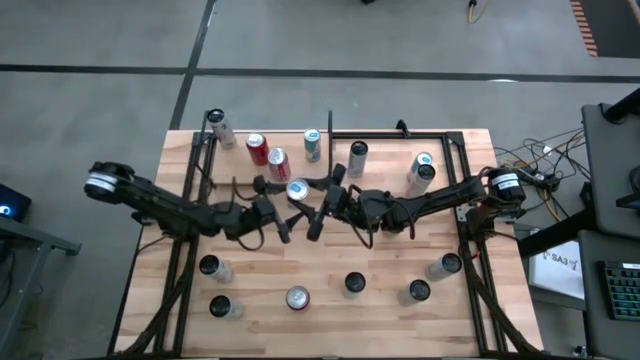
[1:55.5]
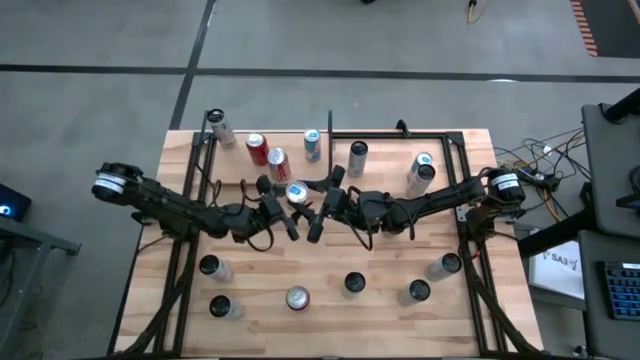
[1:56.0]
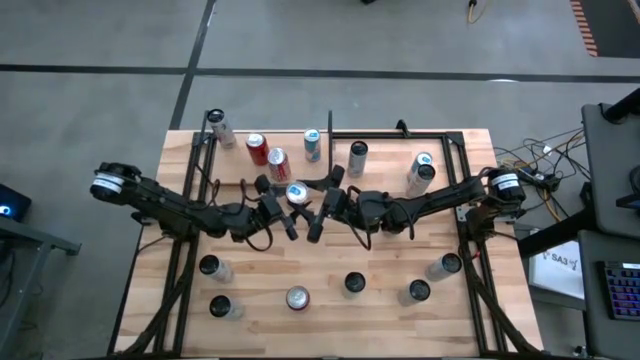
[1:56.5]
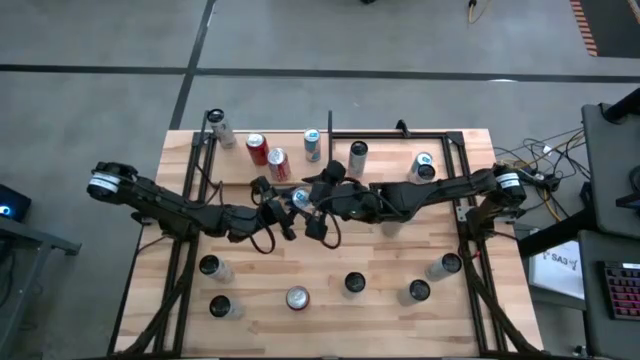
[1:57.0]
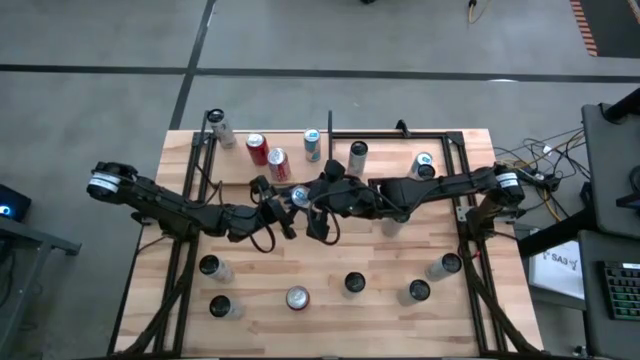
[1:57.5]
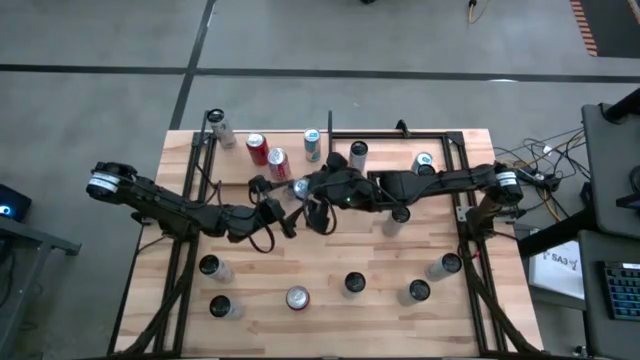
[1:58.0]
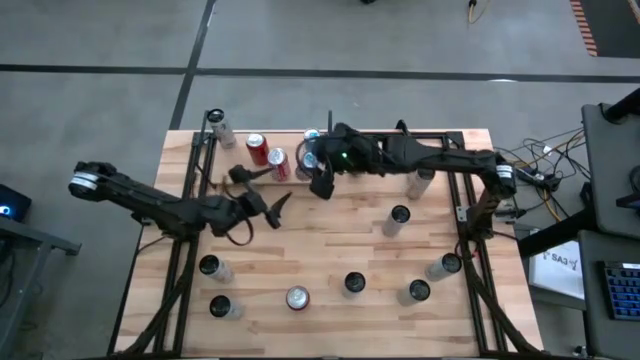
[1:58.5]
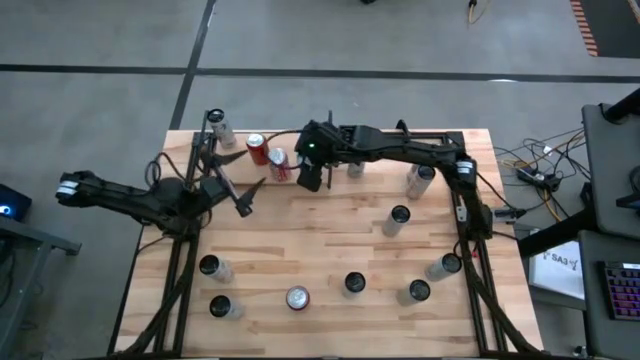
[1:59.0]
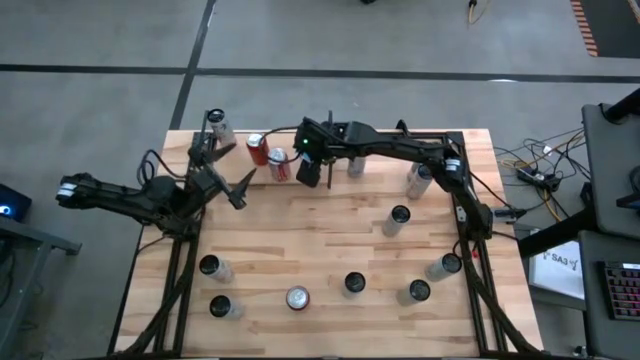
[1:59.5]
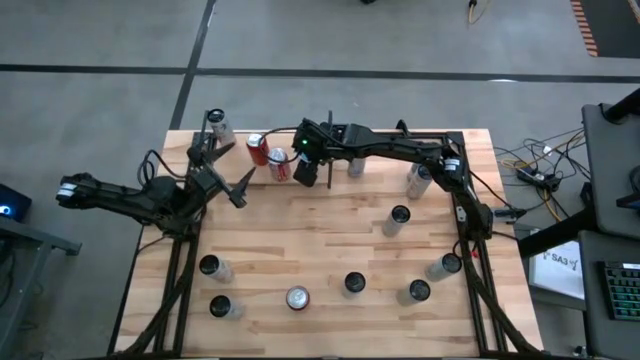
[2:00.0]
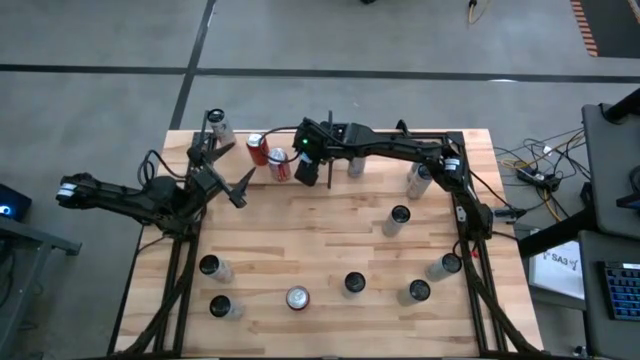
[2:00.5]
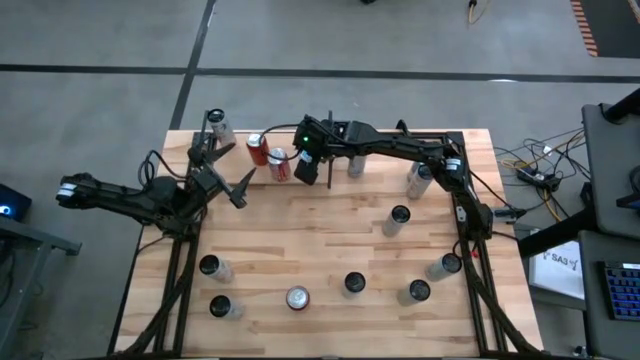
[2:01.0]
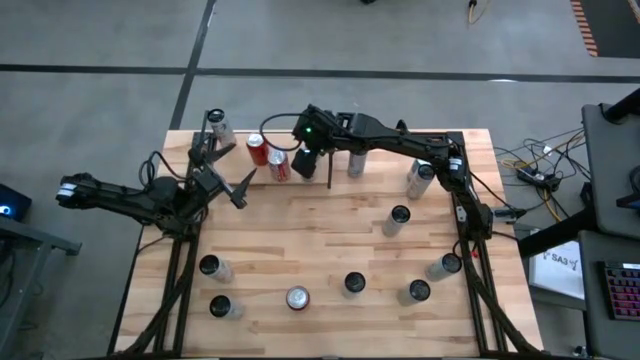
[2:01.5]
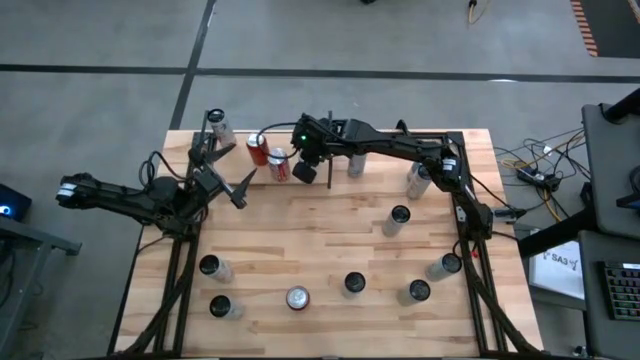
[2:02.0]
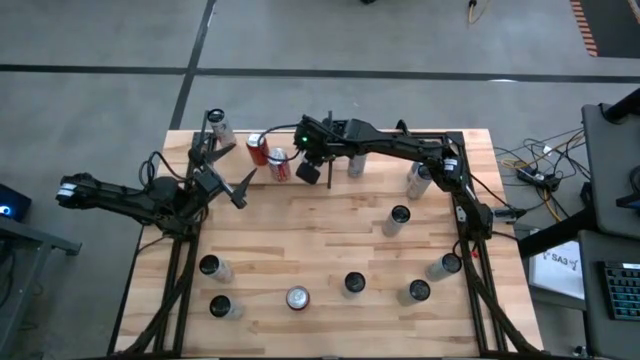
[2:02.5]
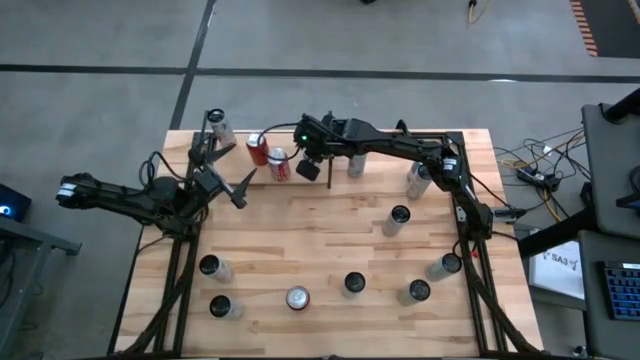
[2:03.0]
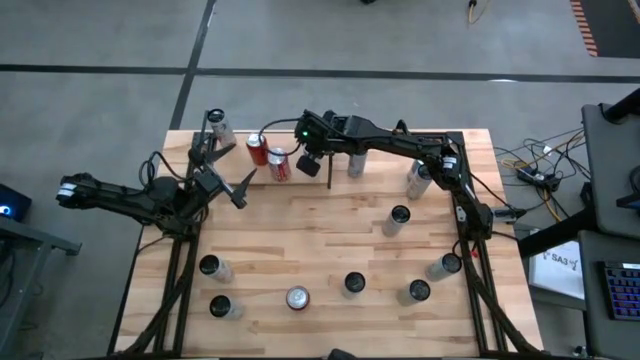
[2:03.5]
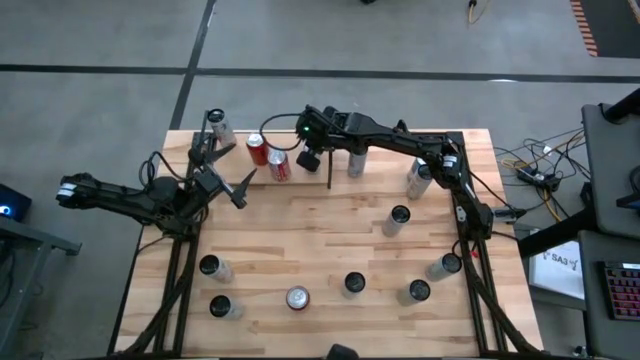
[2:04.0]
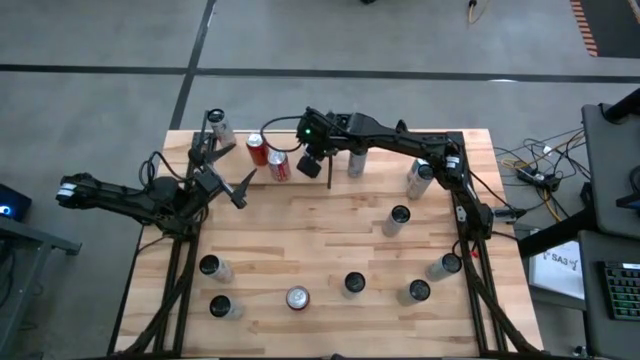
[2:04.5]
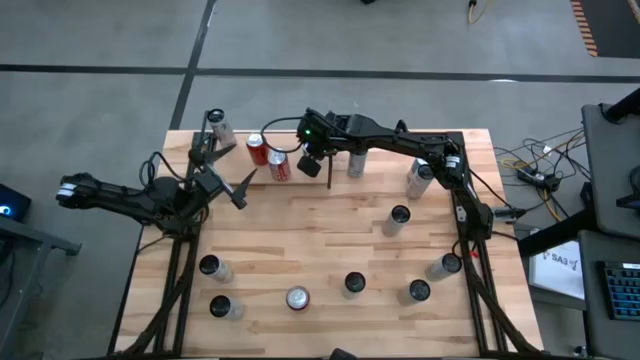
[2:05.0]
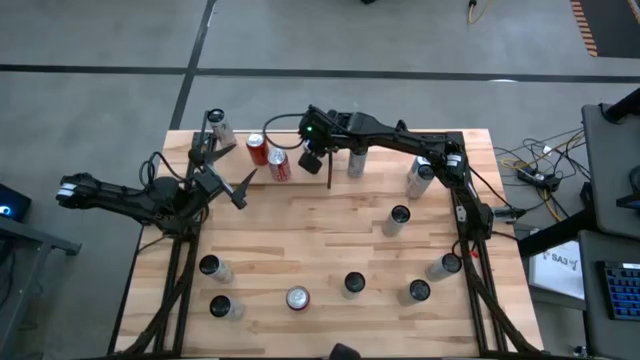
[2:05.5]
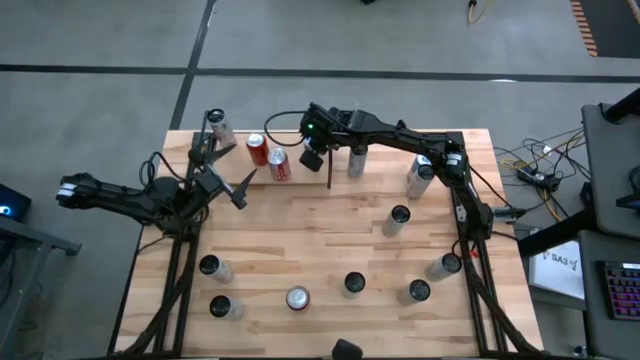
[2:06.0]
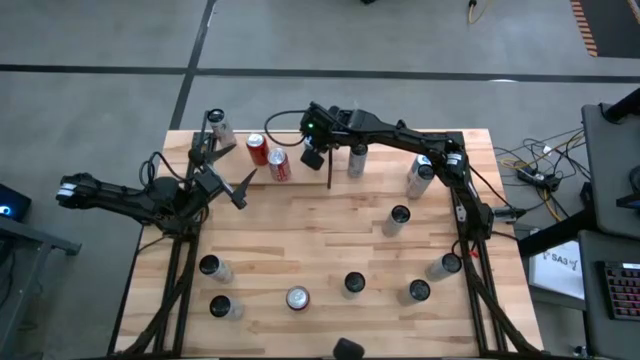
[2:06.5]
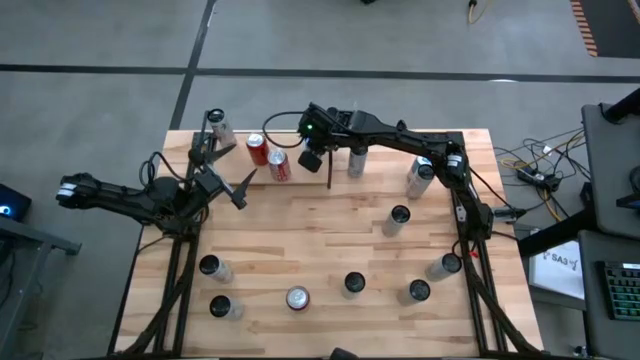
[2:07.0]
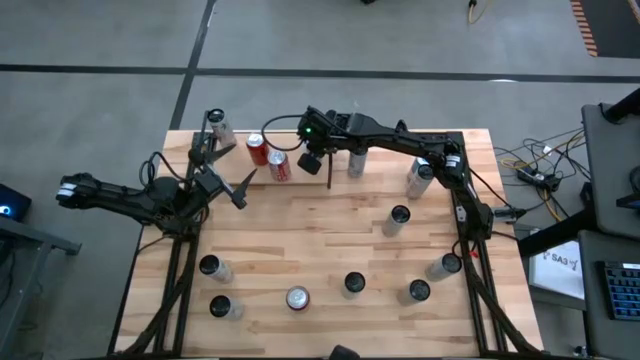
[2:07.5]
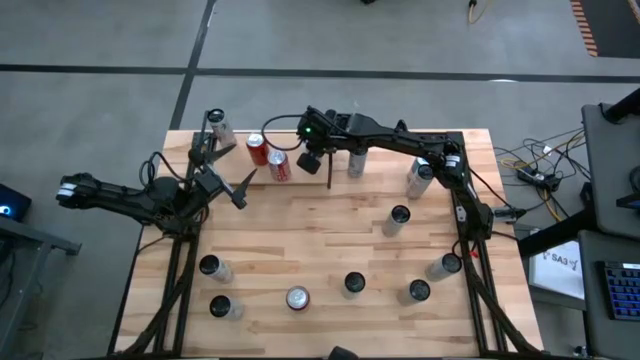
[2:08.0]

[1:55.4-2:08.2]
Task: Place canned beverage on shelf
Put the bottom blue and silver soda can on the shelf aligned with the other blue and silver soda can

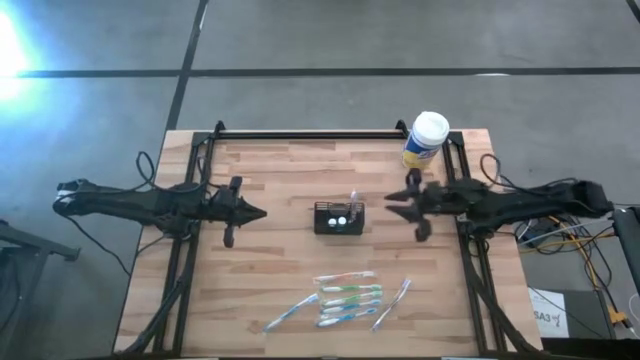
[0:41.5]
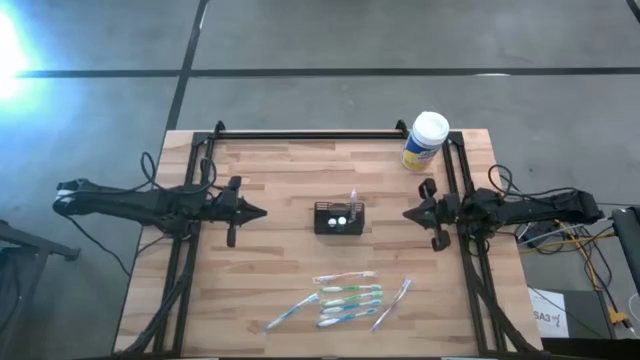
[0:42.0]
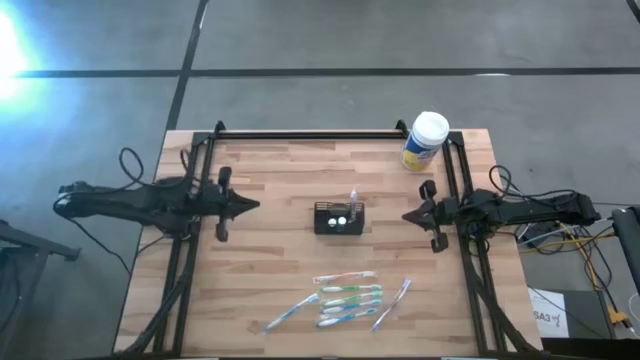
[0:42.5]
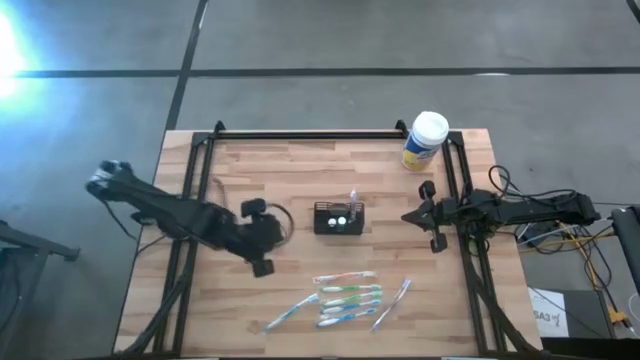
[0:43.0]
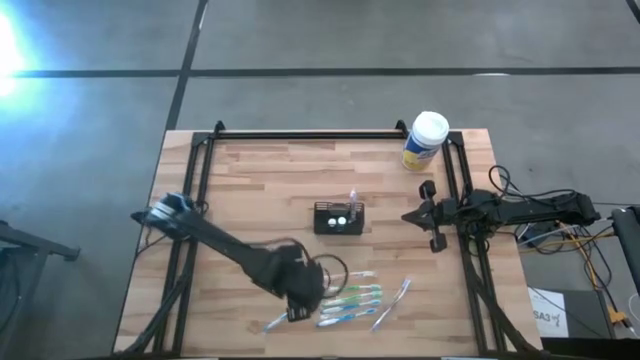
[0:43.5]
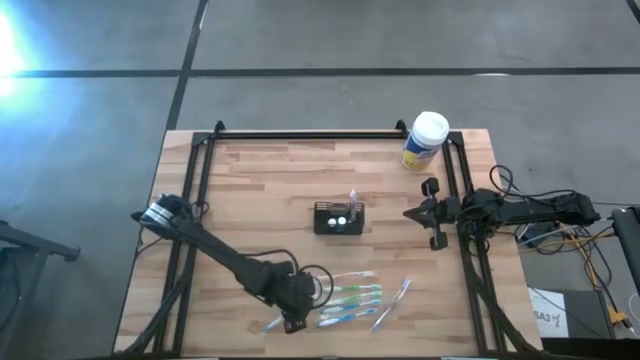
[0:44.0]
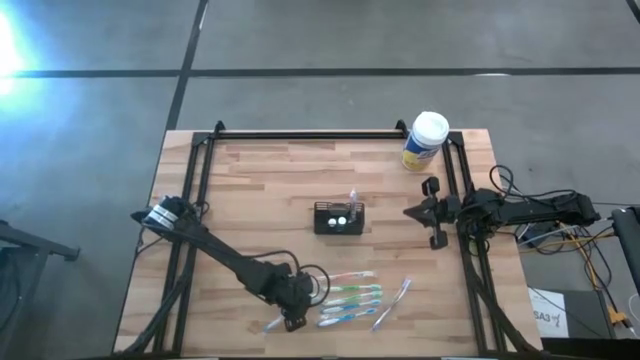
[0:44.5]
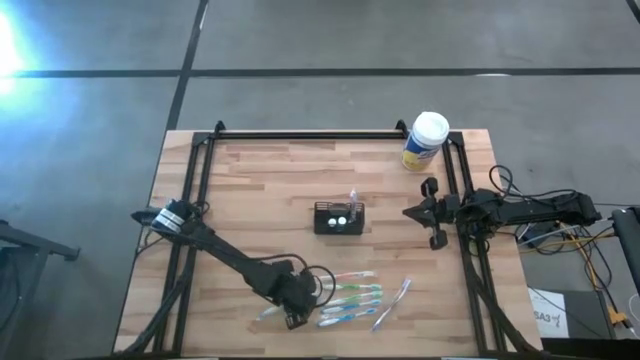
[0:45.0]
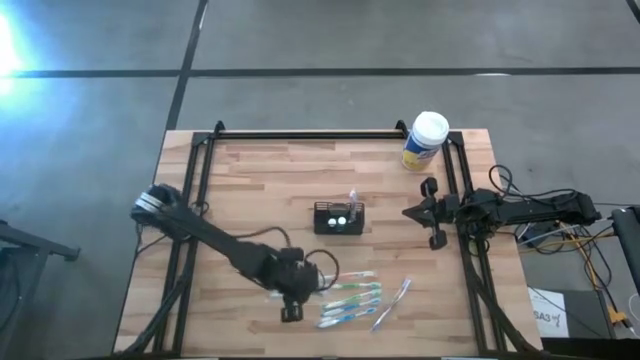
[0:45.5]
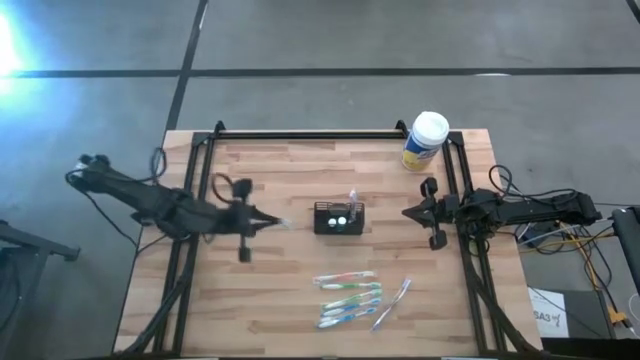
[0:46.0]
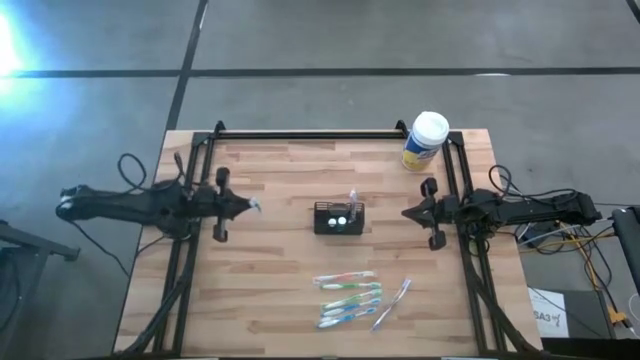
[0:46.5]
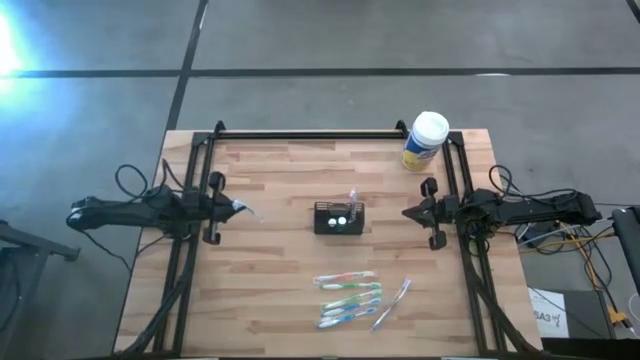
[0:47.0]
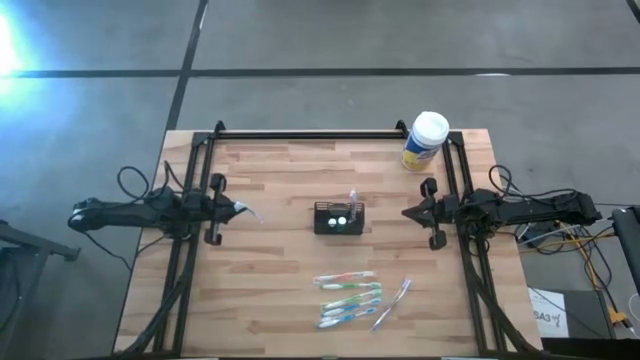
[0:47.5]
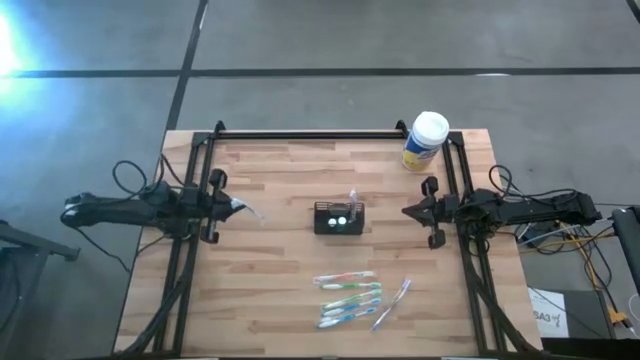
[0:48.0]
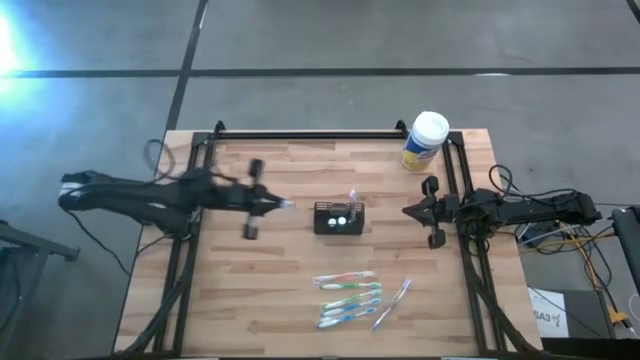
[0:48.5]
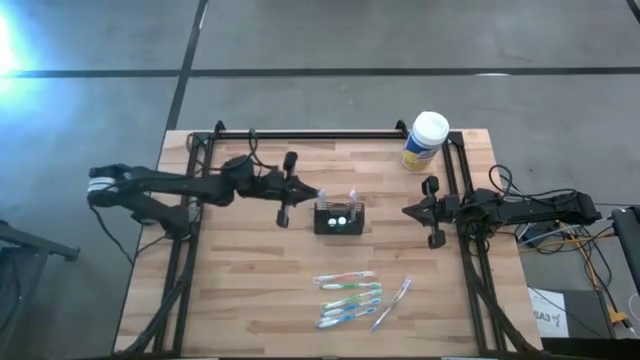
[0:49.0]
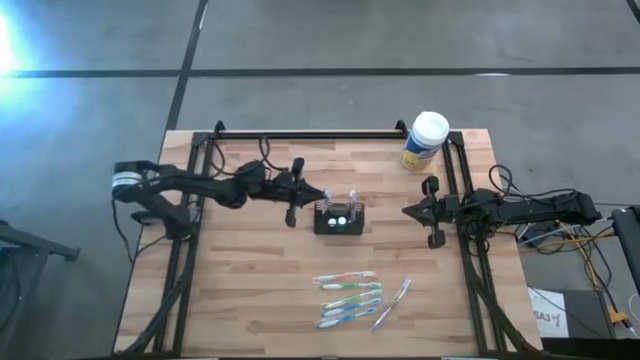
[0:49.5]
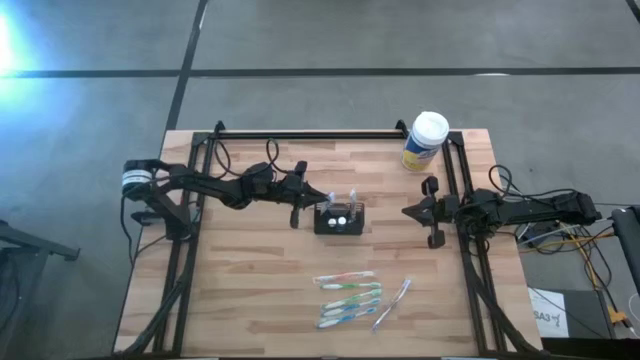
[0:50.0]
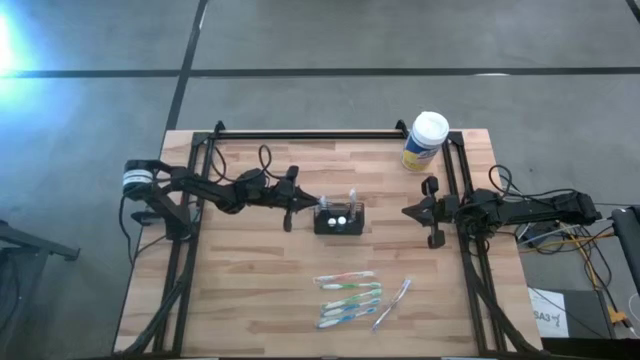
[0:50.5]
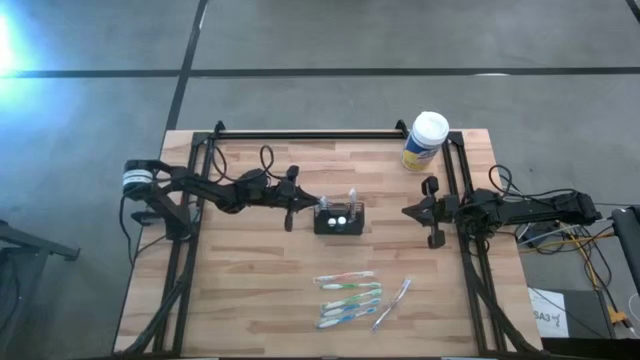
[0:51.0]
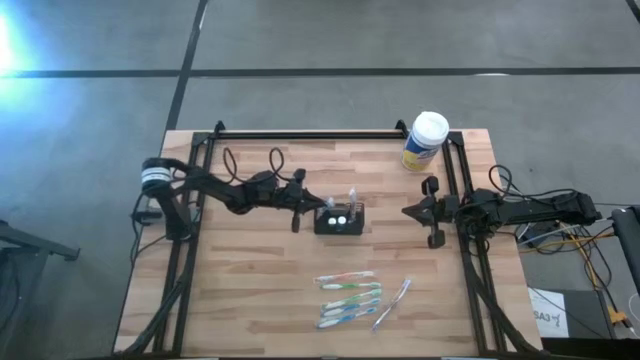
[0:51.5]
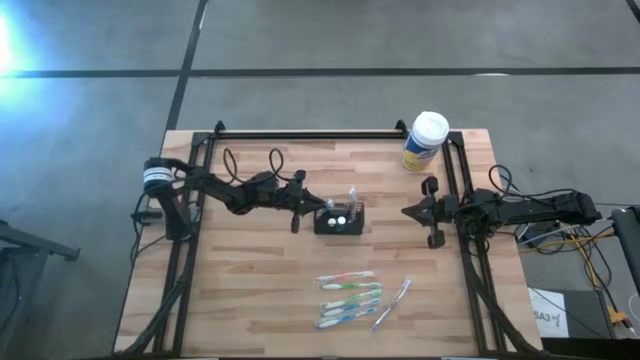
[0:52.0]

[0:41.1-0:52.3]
Task: Pick & Place toothbrushing station
Put the left blue toothbrush into the wire organizer
